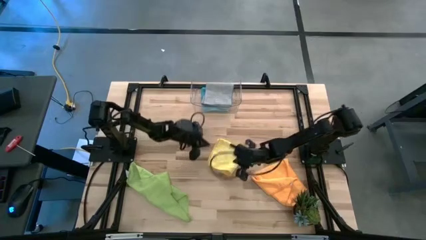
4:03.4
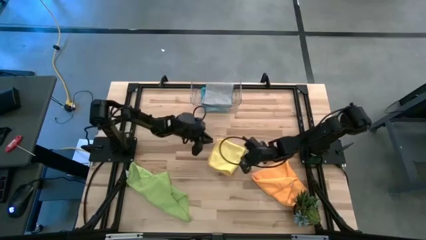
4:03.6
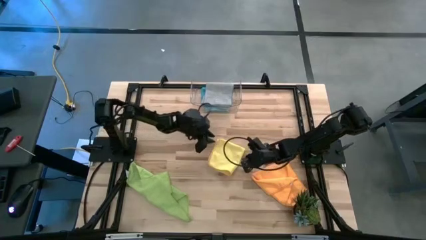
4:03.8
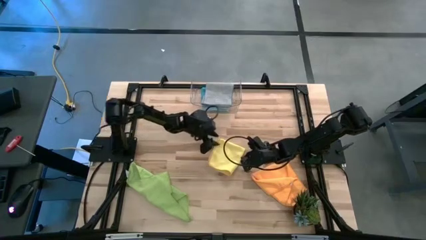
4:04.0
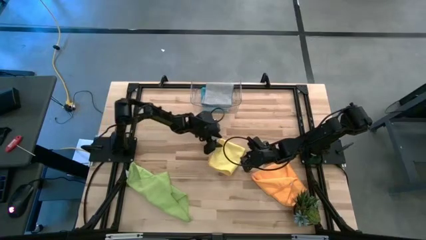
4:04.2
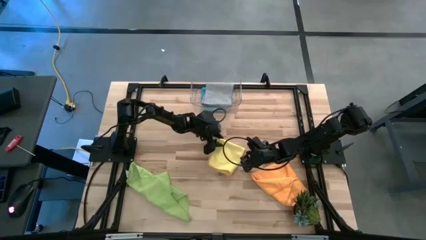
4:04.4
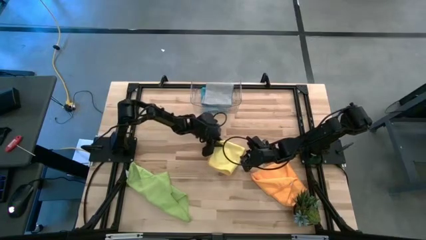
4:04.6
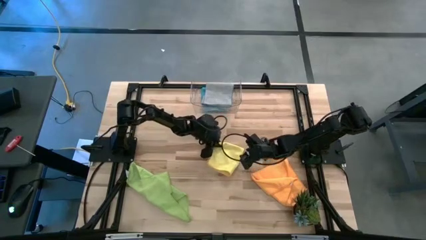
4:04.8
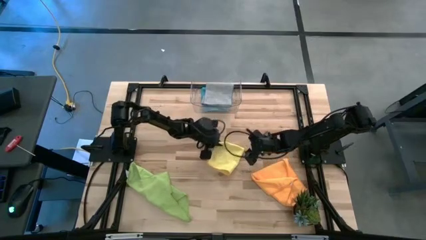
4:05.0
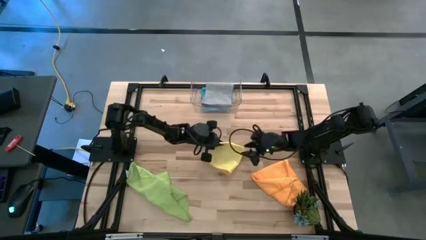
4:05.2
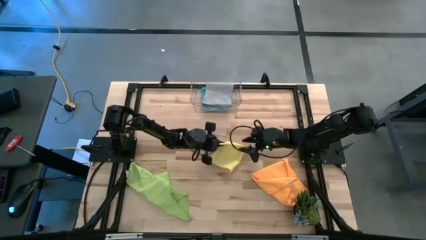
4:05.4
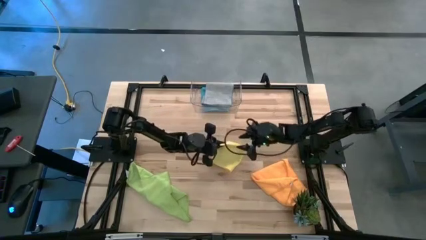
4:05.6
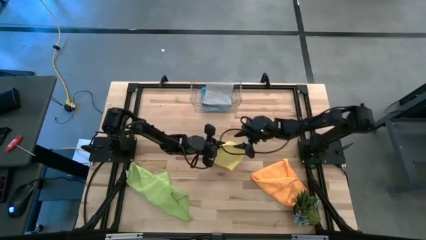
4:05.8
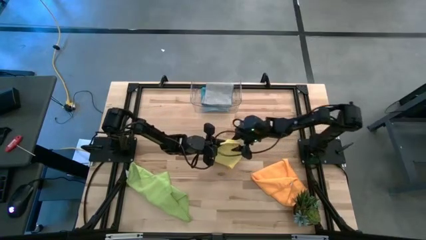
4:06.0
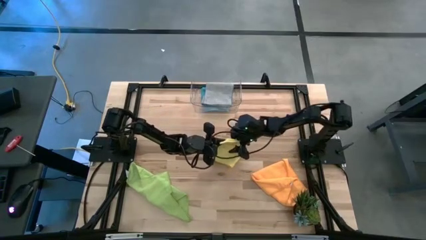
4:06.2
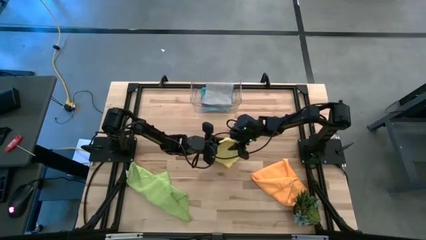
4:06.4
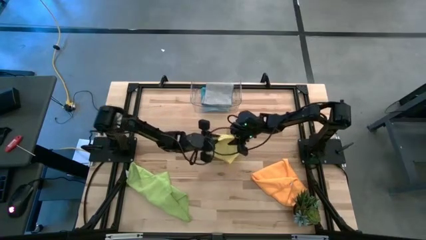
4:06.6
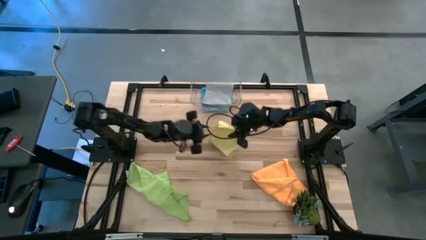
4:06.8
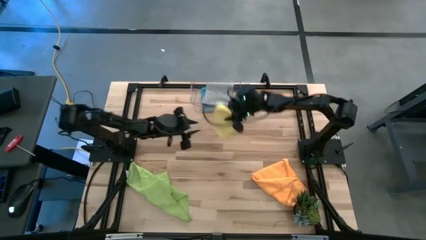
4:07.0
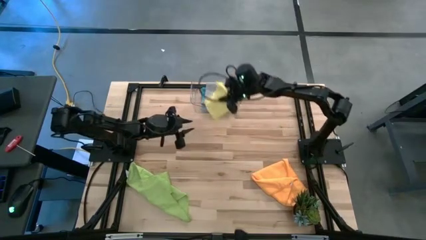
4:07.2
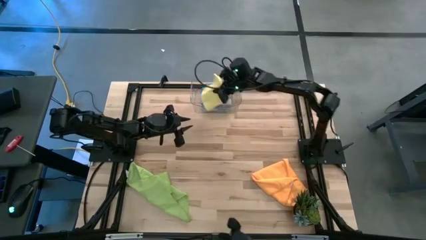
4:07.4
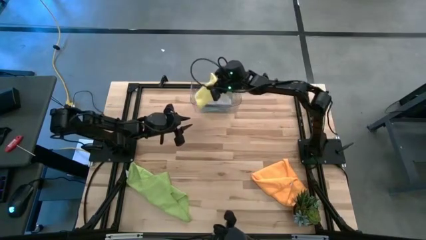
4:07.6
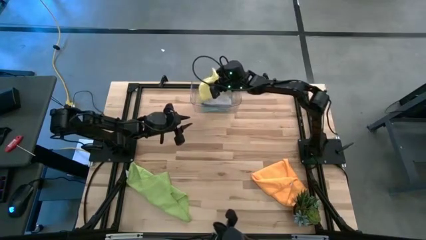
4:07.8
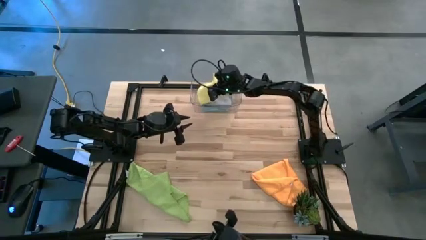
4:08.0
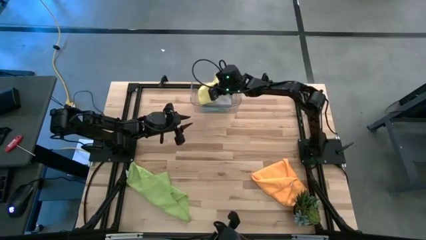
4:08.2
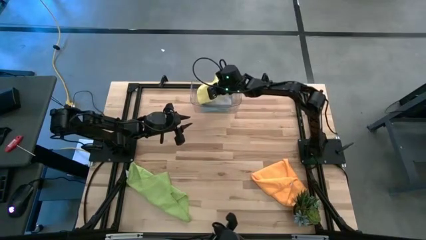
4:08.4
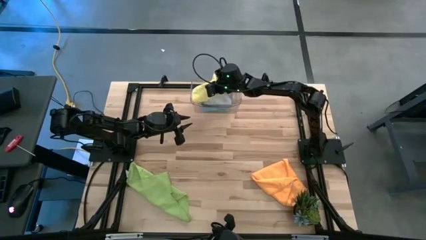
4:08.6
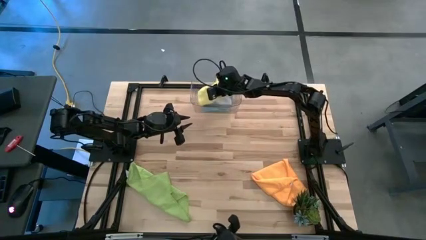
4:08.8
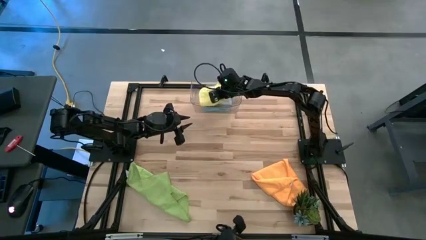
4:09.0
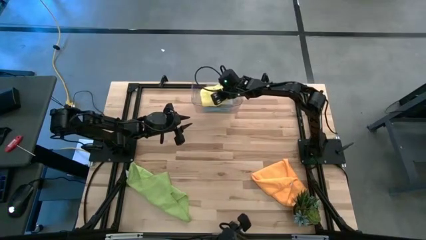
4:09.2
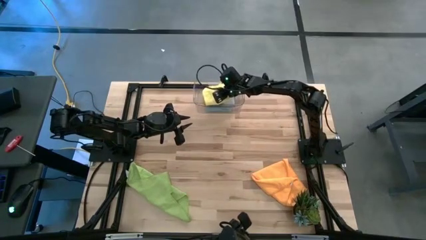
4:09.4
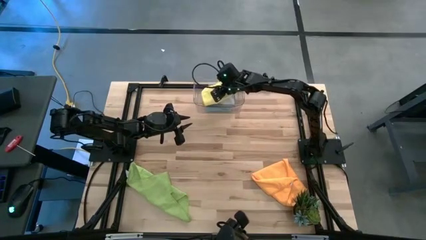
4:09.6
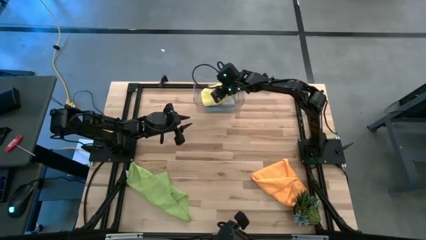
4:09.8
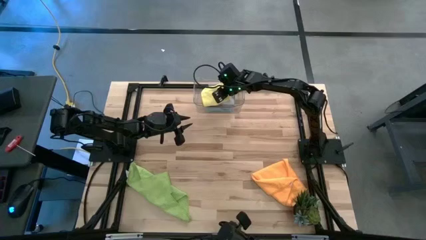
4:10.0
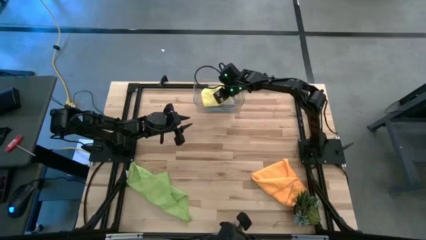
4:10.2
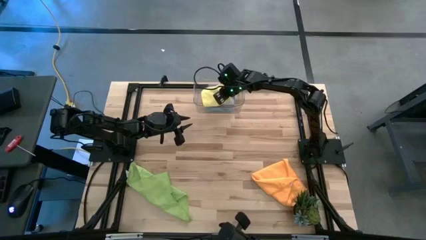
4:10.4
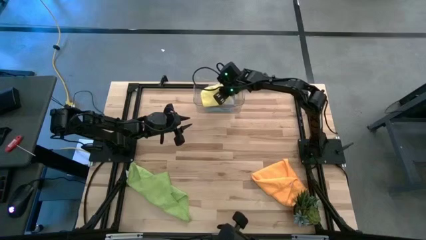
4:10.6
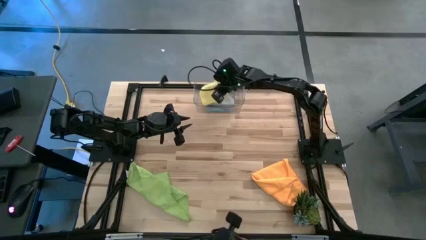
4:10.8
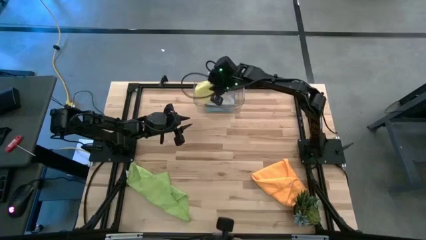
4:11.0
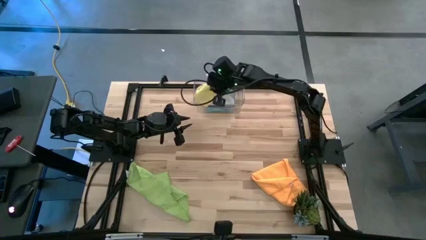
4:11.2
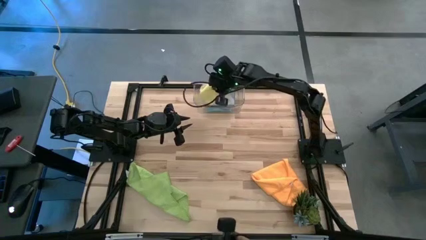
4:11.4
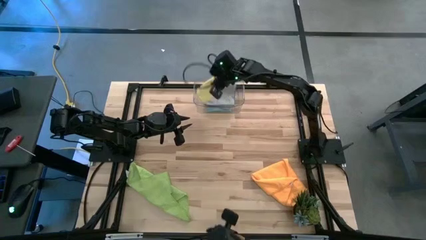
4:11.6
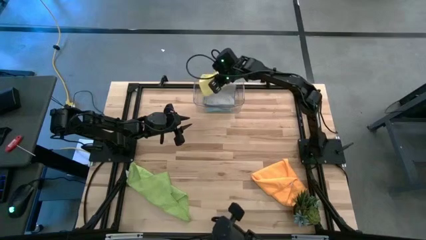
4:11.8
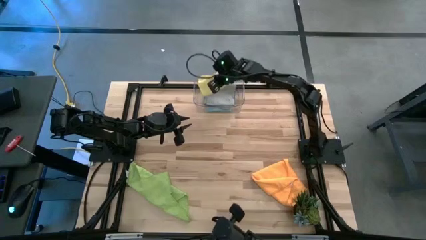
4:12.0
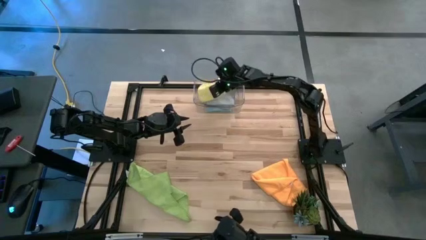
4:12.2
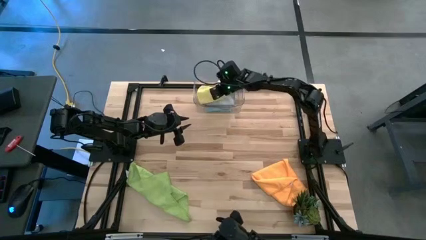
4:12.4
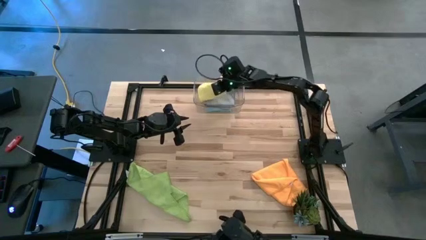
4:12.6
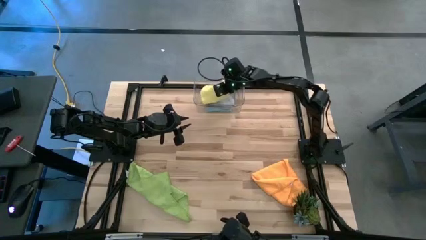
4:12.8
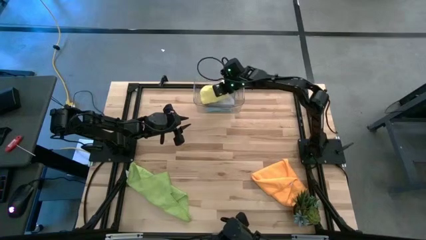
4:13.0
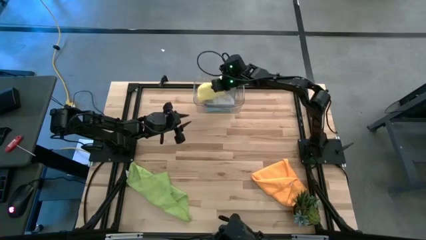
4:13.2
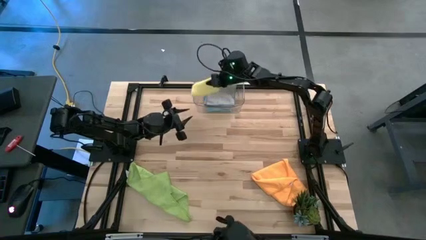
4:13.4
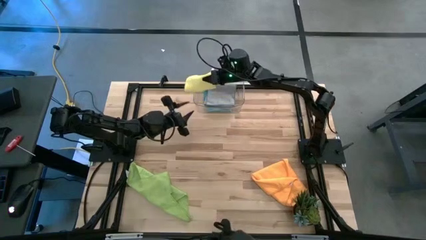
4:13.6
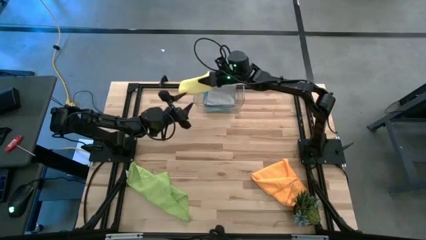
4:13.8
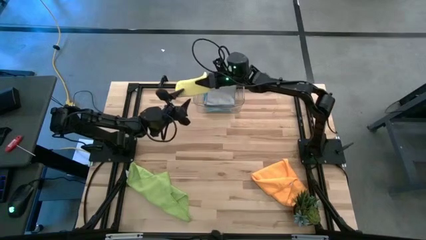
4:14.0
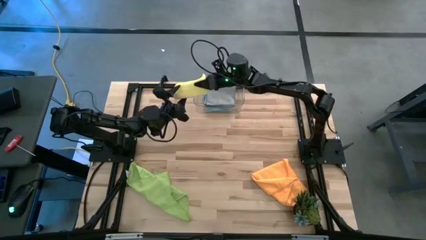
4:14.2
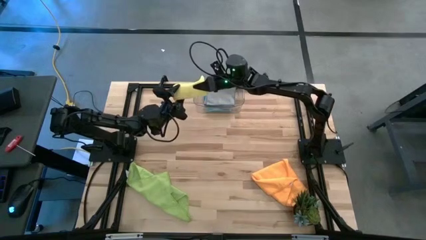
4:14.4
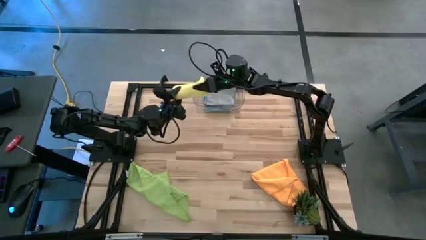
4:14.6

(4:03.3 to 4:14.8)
Task: Fold microfiber towels
Put the yellow towel into the transparent bin

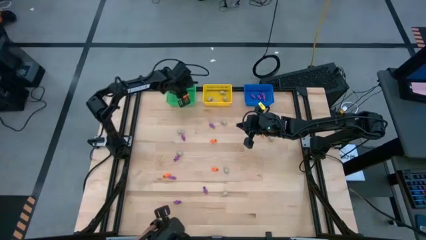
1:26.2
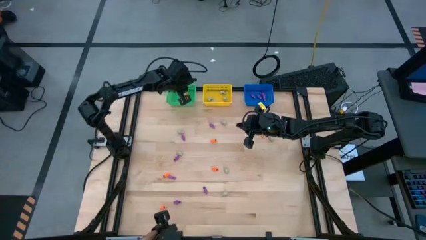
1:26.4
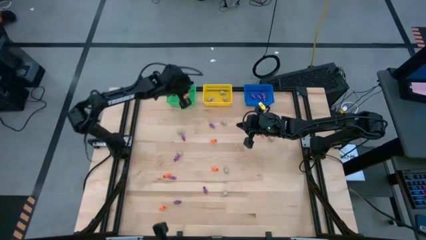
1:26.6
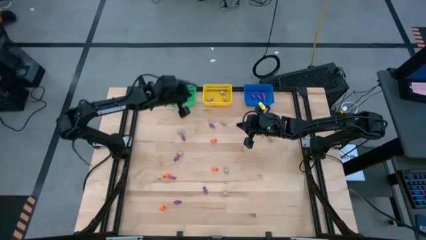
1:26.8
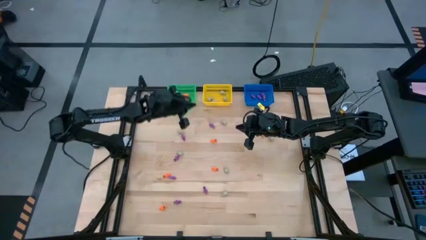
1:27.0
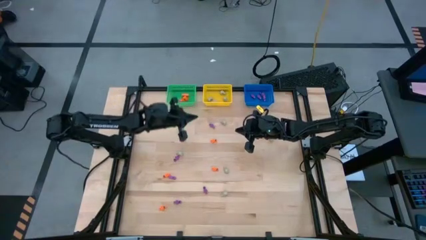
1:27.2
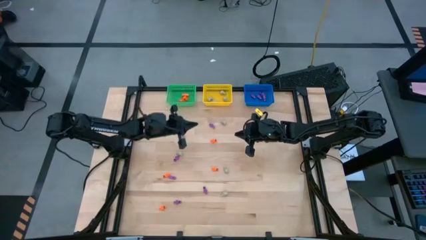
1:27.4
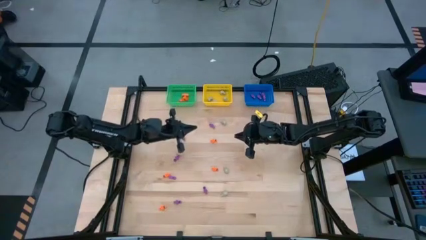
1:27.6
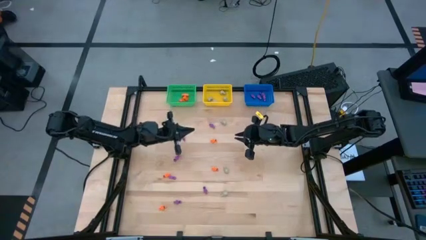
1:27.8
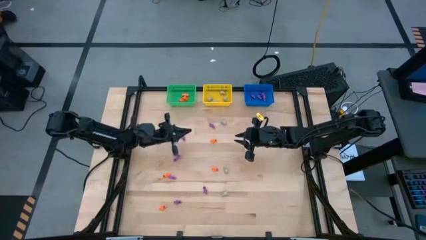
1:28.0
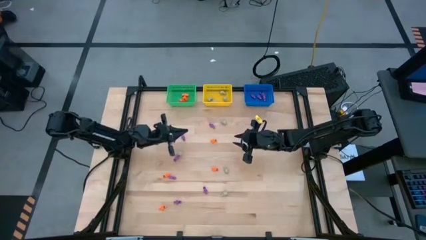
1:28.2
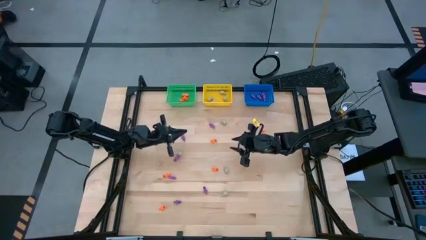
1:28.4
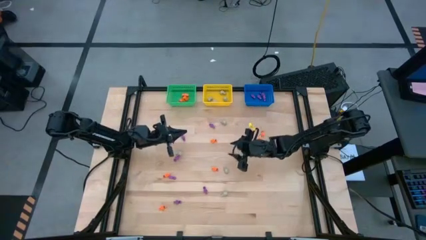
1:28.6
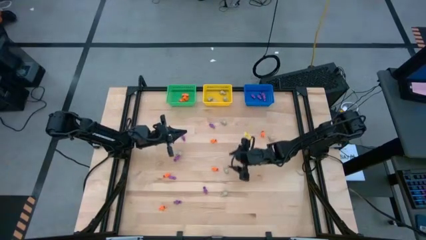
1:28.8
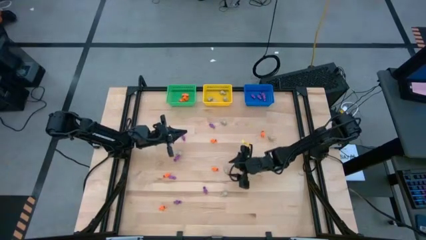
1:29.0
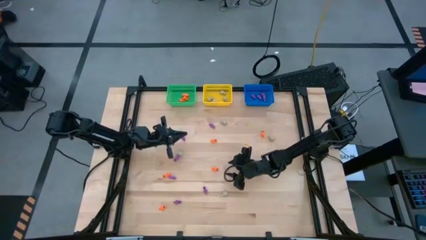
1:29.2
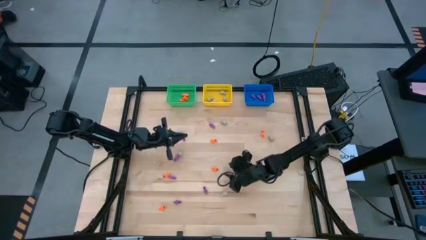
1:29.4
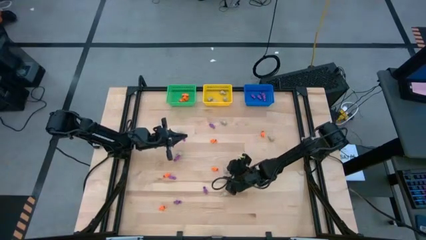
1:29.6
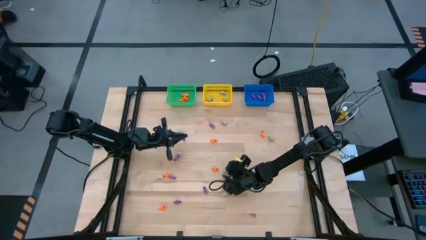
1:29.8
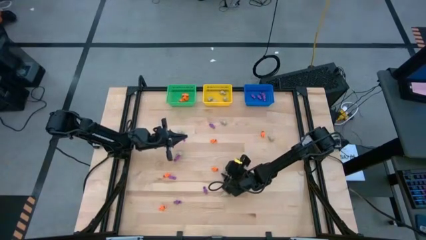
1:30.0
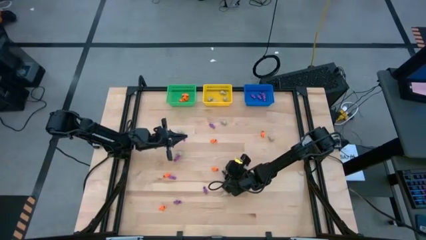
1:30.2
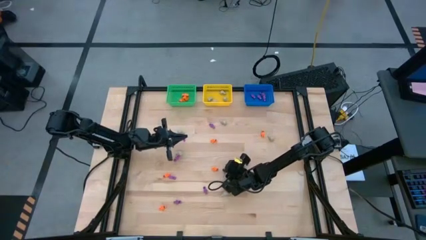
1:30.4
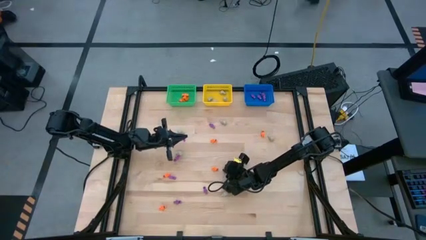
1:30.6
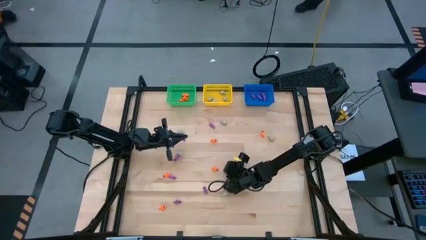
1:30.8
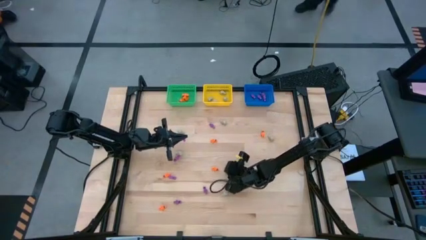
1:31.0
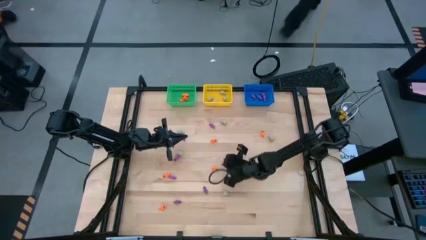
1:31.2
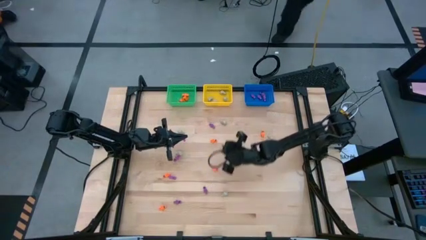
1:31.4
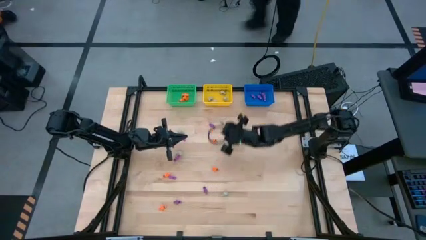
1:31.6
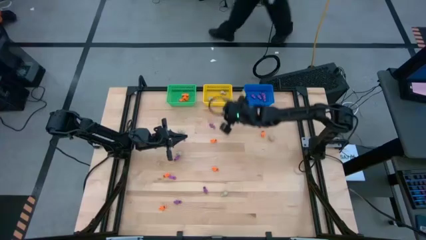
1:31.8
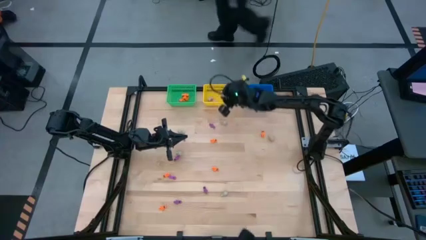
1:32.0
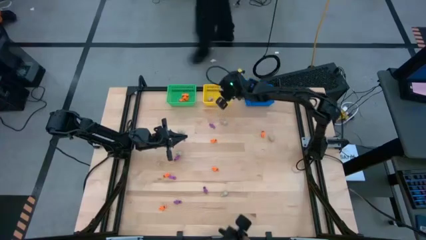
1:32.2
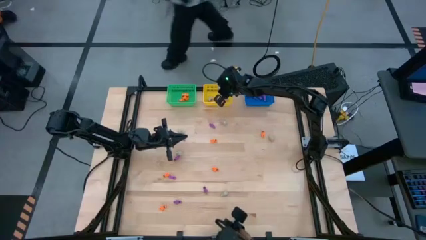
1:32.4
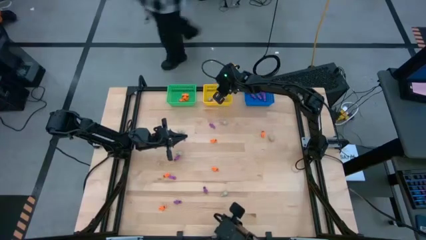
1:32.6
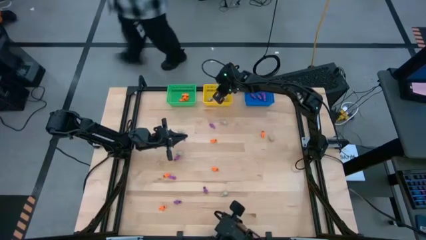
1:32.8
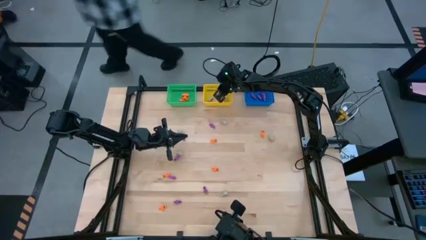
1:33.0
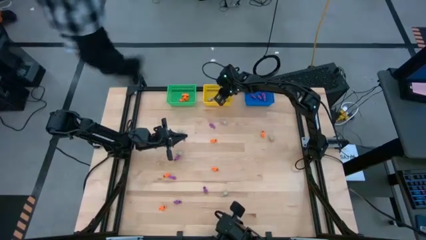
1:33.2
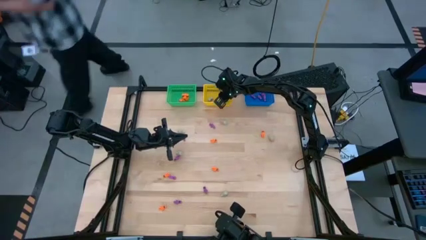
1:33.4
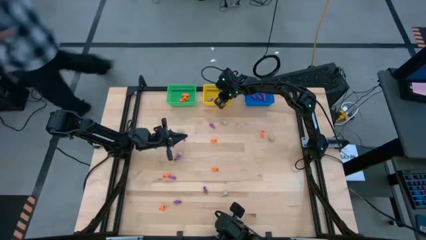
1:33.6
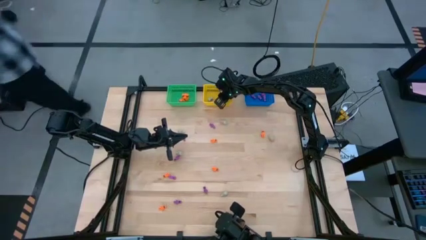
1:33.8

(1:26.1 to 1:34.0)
Task: Sort Halloween decoration
Put the white skull toy into the yellow bin
